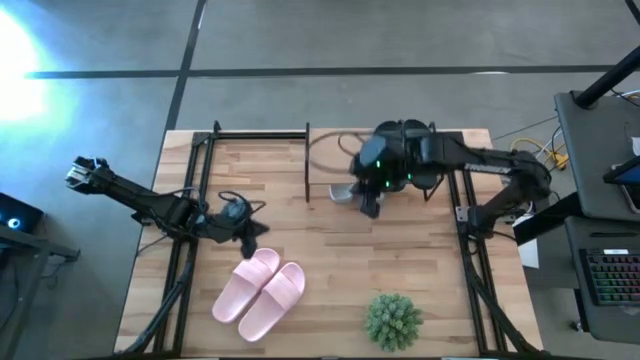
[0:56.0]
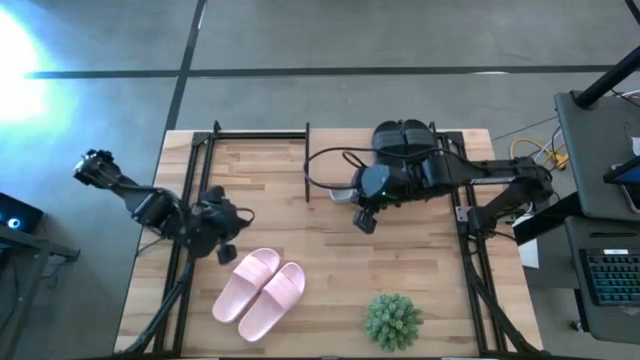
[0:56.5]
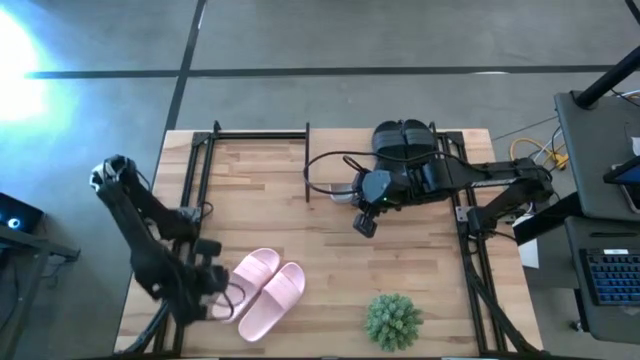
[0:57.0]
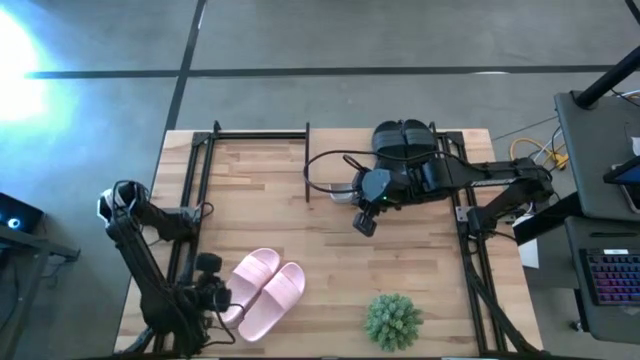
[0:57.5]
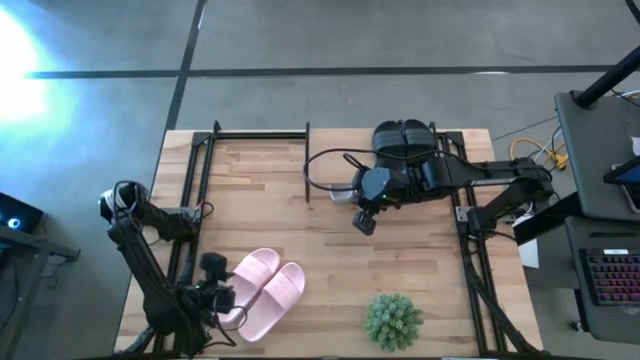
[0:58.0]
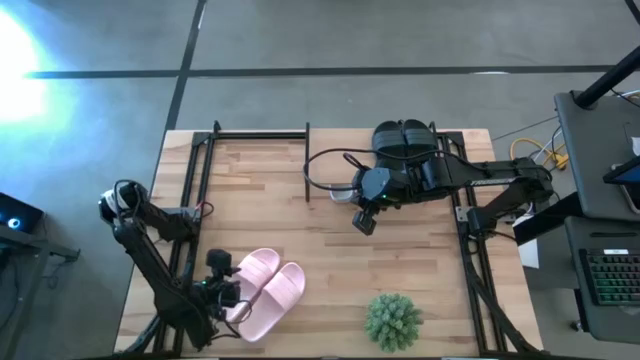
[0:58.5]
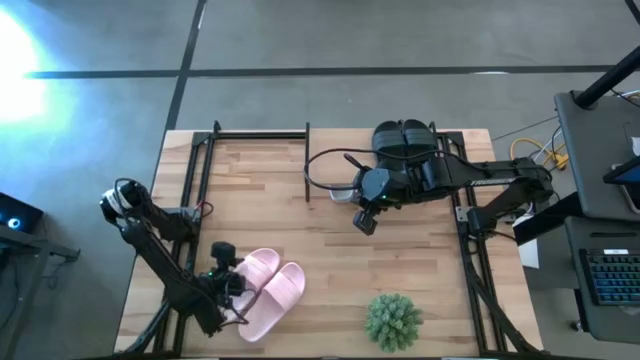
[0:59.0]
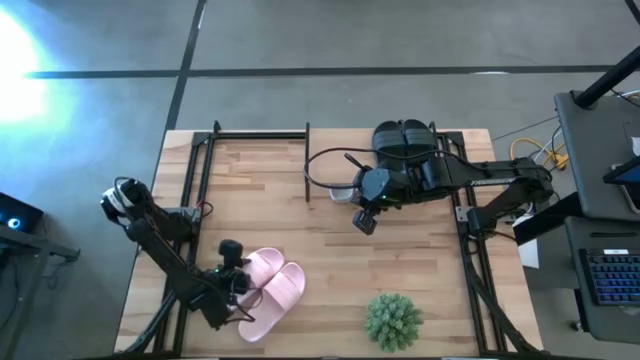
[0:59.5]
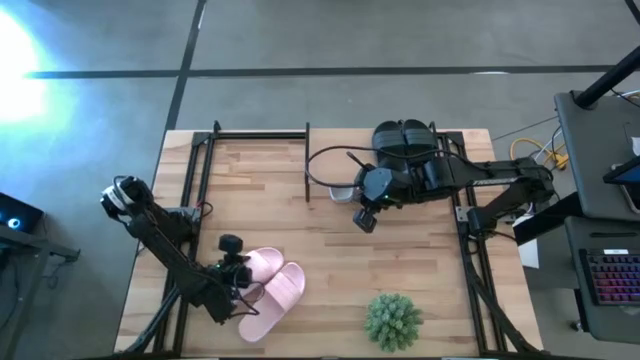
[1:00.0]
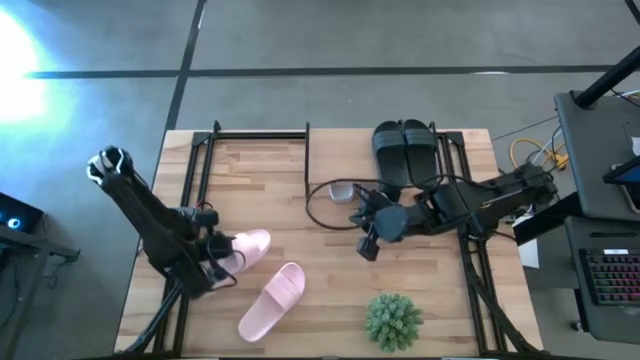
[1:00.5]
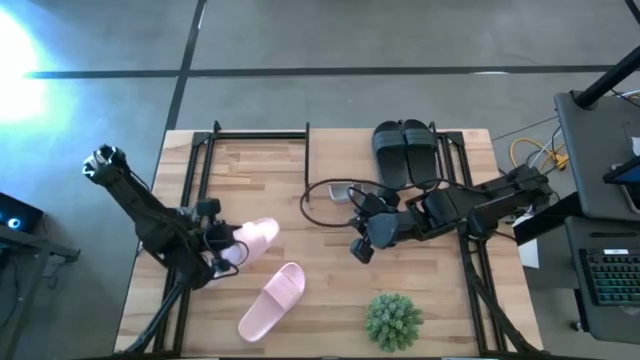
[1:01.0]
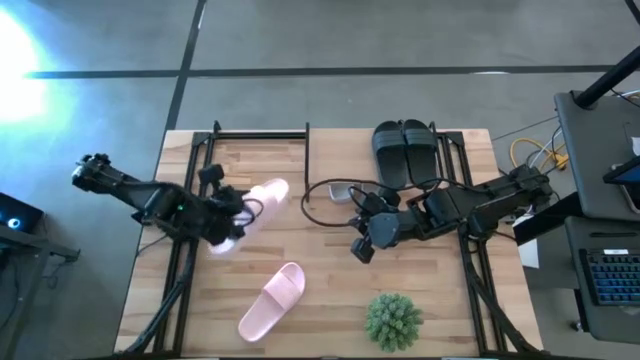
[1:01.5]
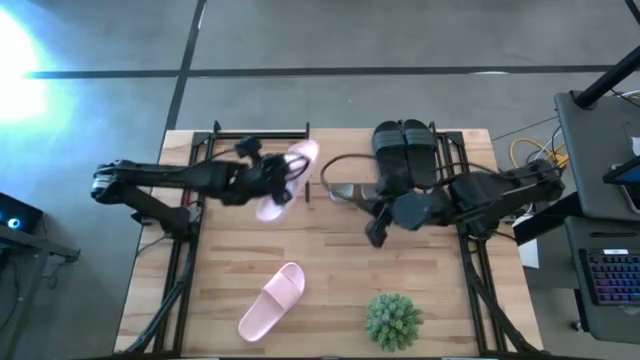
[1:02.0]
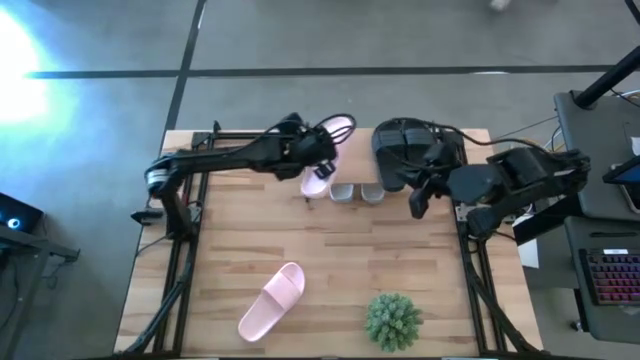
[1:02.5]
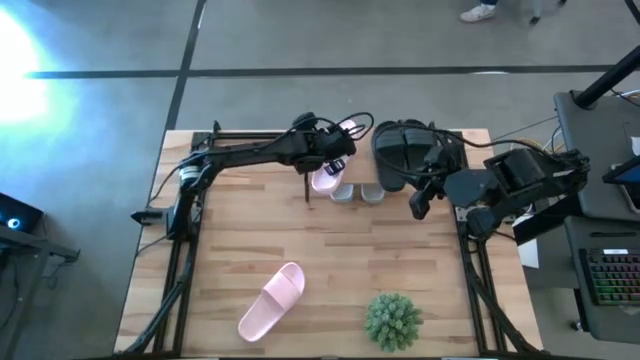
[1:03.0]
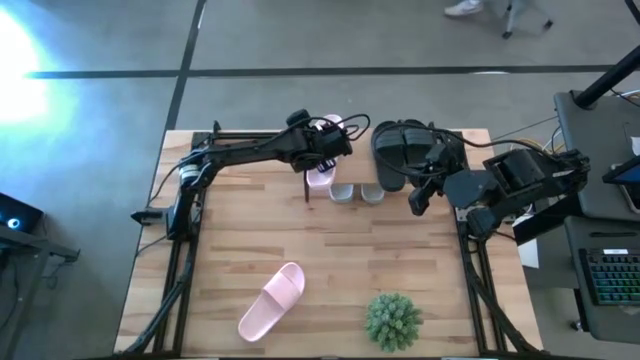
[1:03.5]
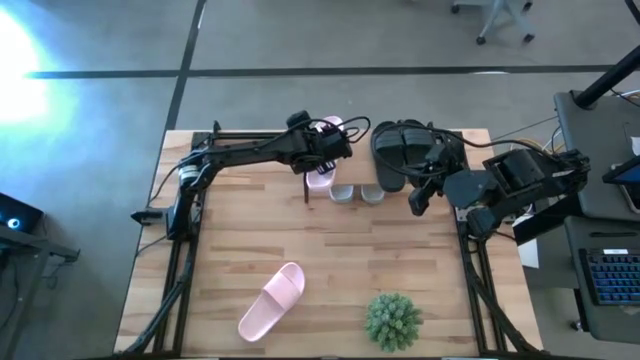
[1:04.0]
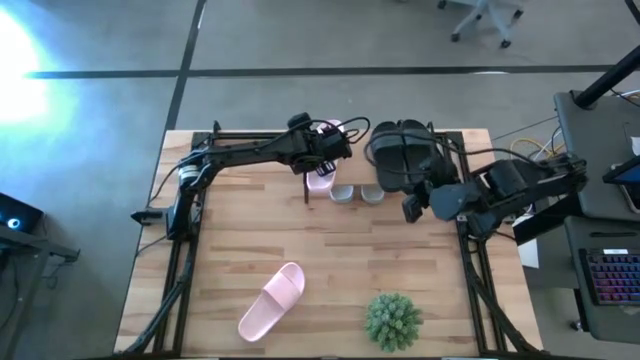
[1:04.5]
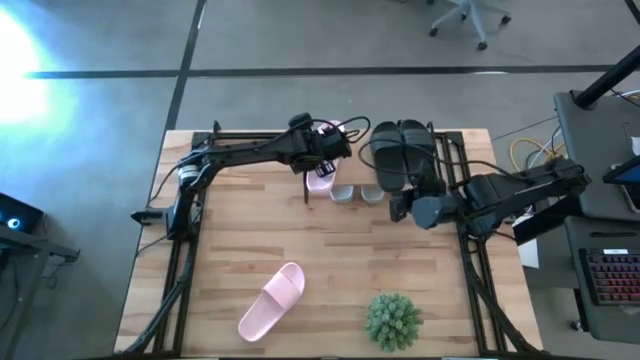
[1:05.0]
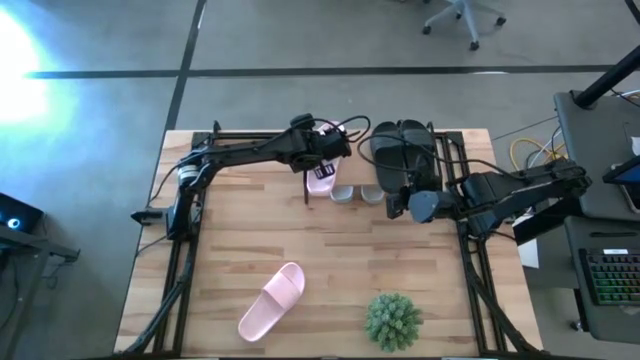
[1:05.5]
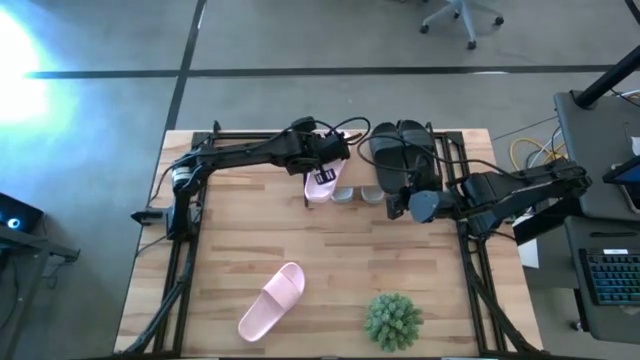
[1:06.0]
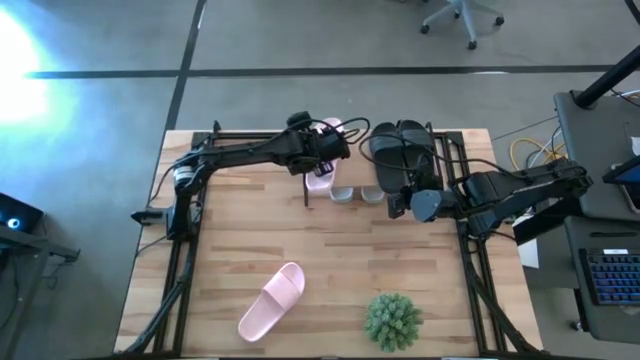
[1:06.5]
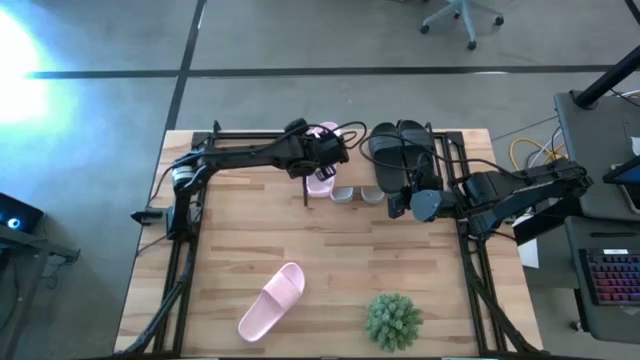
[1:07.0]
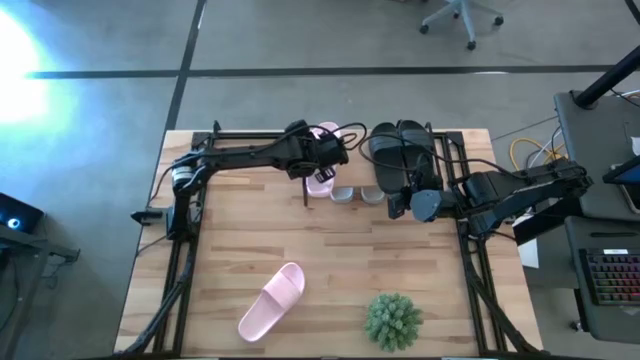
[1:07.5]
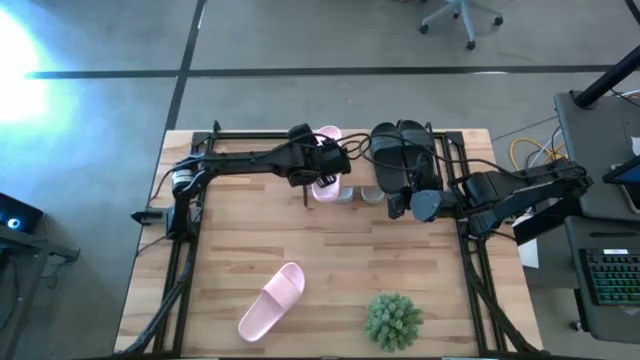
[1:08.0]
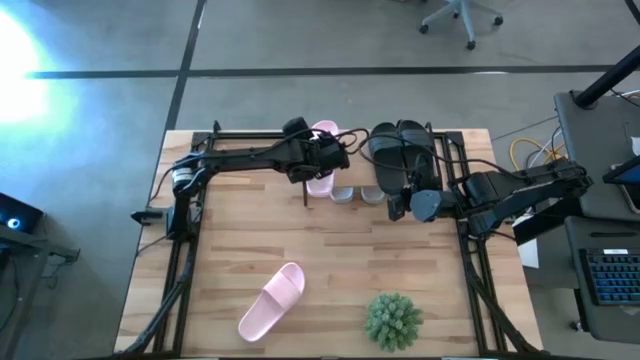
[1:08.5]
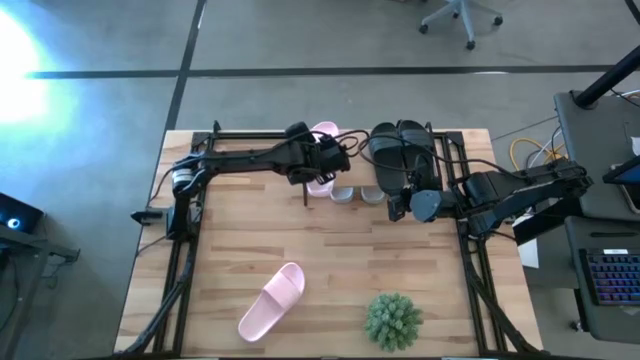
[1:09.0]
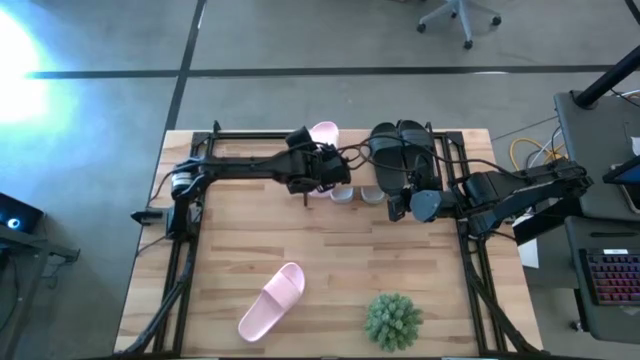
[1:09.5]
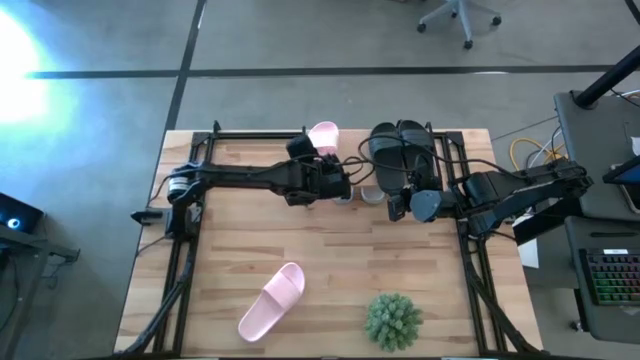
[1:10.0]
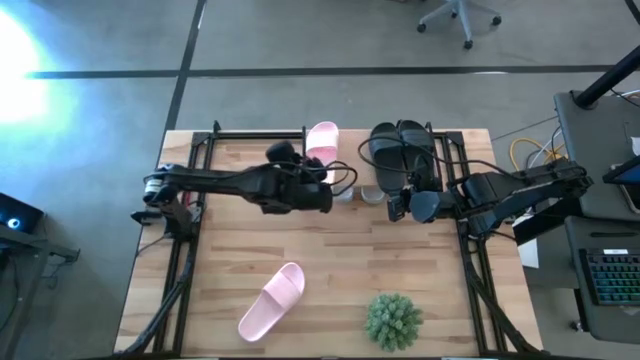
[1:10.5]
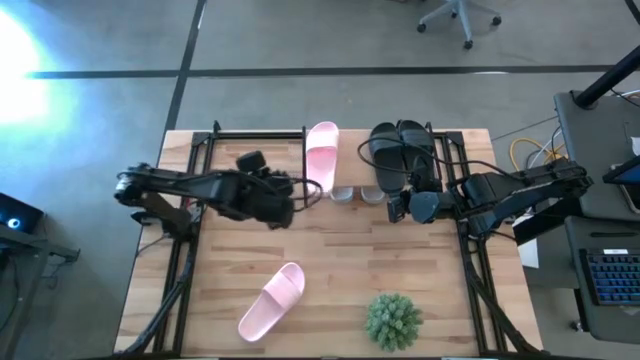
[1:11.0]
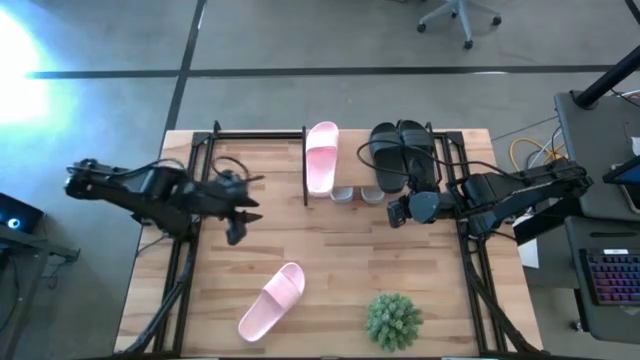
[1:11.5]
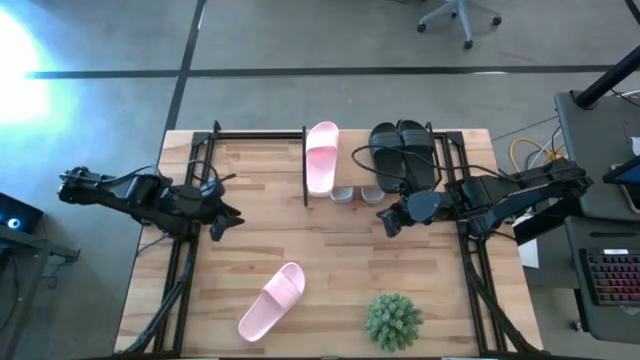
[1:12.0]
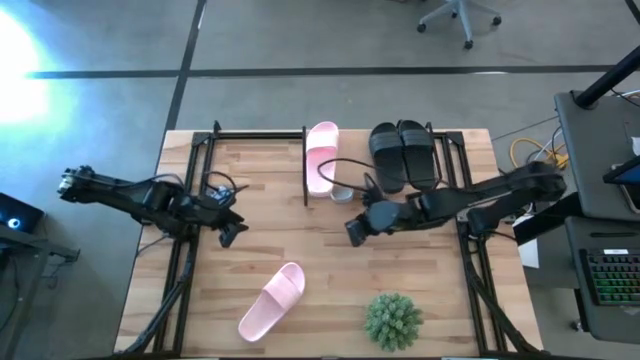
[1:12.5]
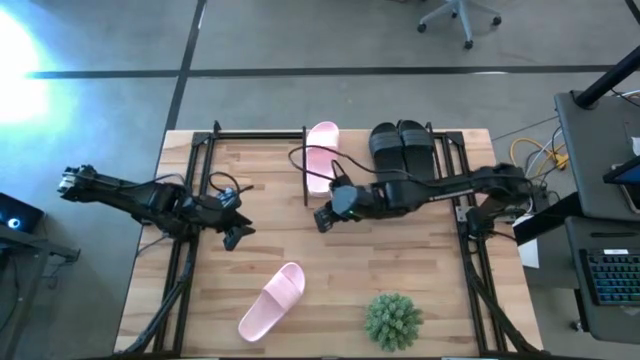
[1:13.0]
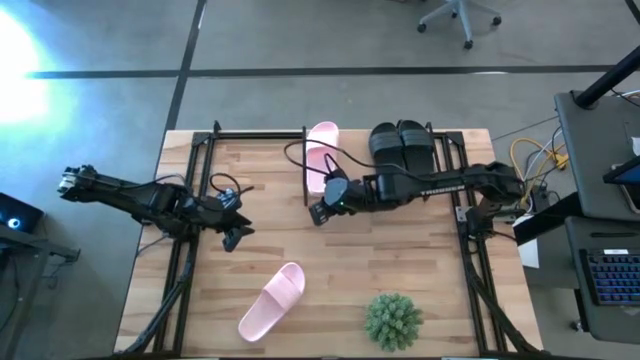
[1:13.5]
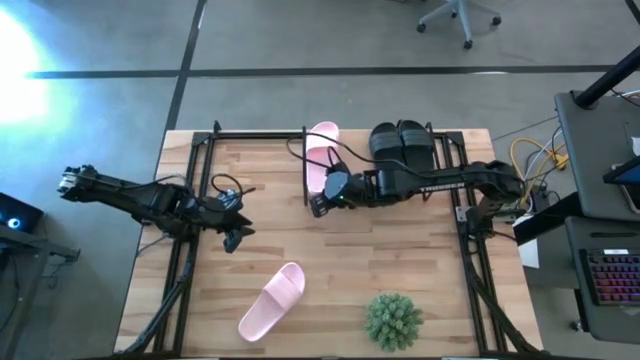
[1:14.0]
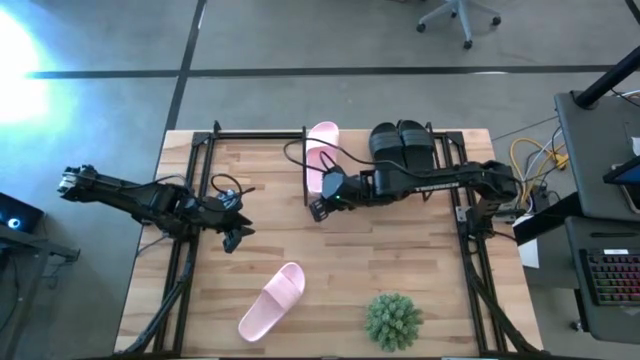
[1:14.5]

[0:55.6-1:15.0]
Task: Pick and place slides into the shelf
Put the left pink slides on the shelf

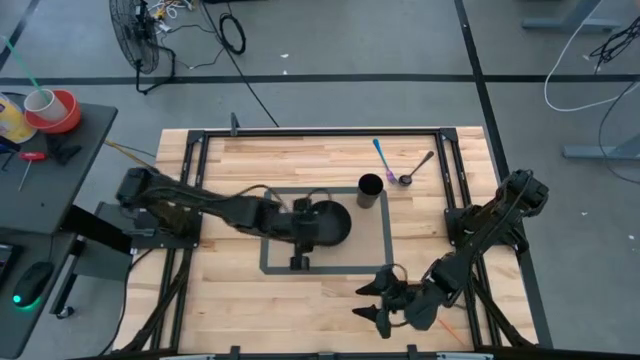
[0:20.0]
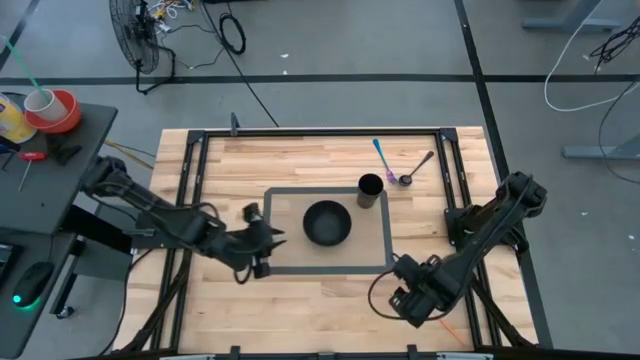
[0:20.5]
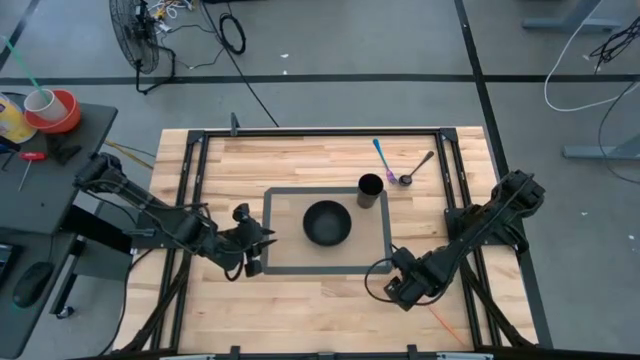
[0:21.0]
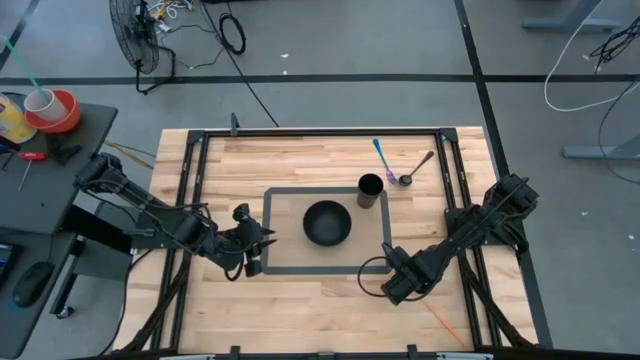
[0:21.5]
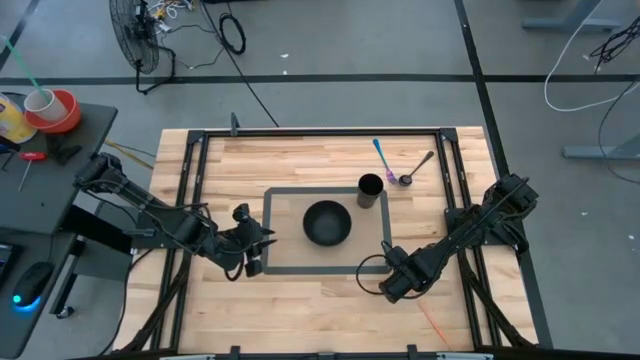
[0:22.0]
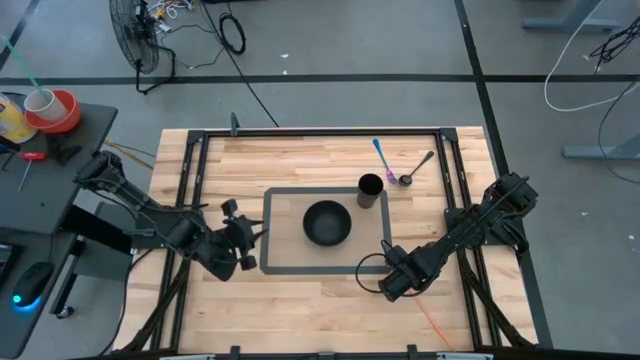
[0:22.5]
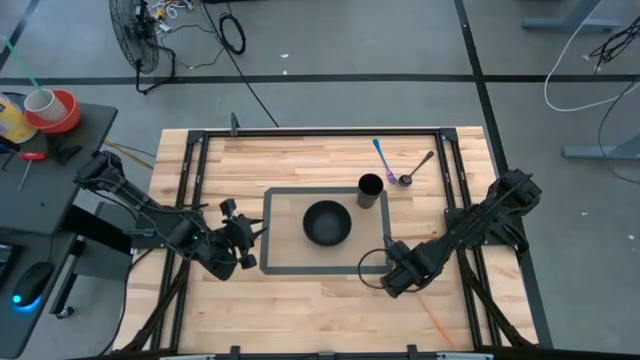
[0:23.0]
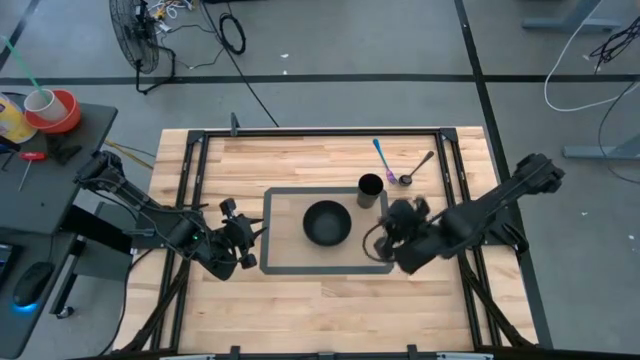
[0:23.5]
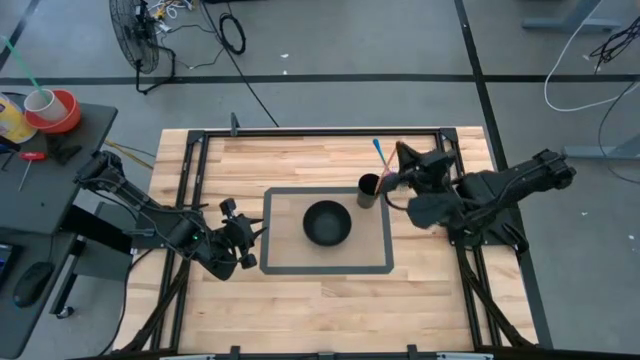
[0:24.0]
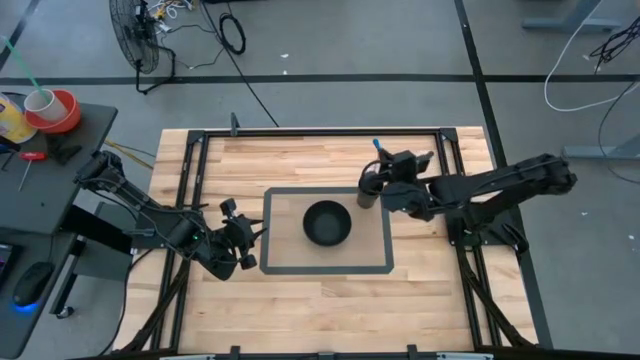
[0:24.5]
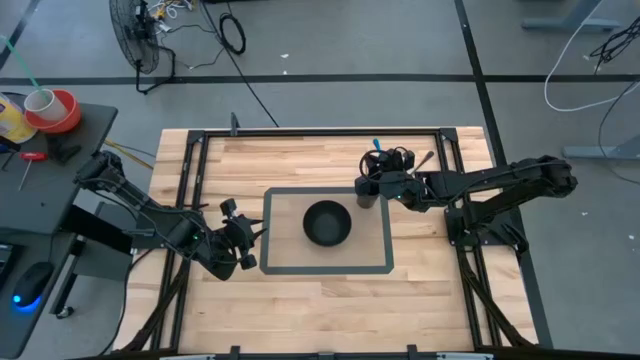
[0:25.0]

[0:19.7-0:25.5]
Task: Pick & Place Utensil
Put the orange straw into the black cup on the transparent mat
